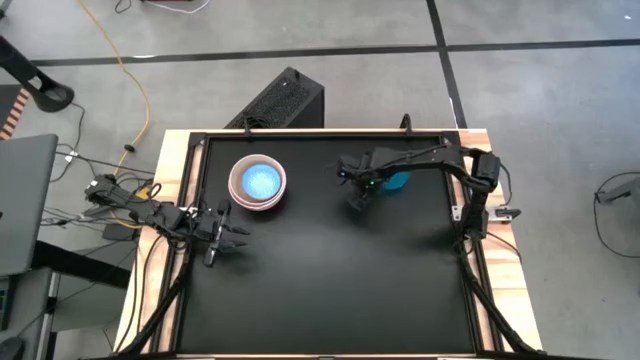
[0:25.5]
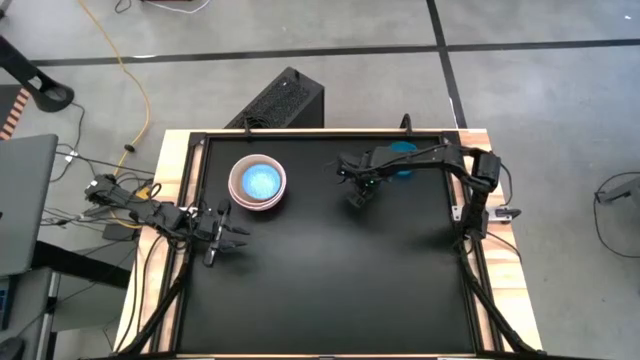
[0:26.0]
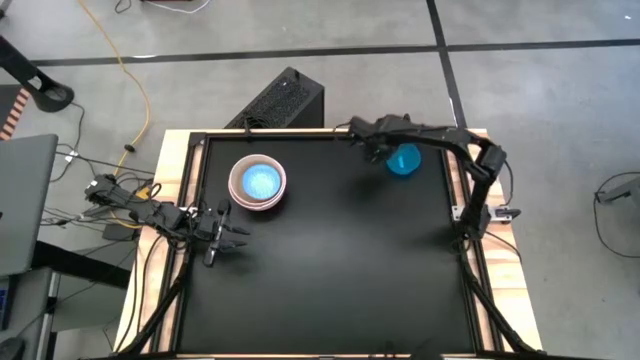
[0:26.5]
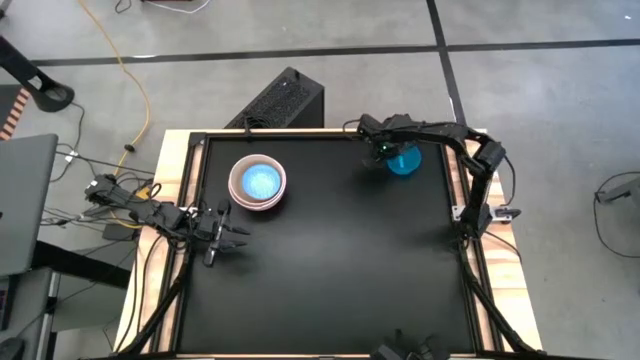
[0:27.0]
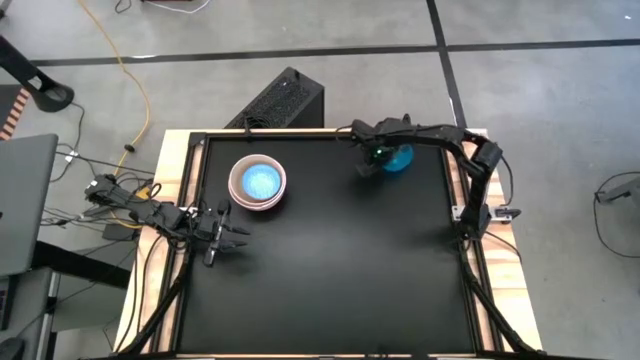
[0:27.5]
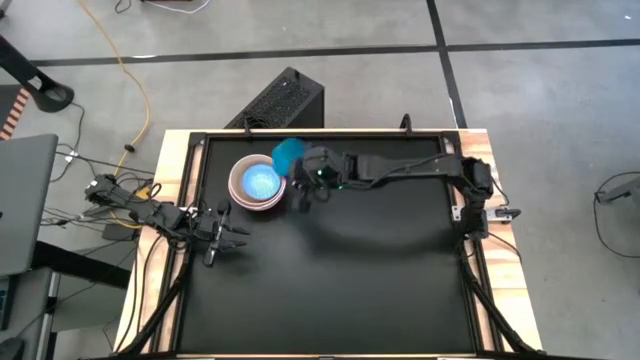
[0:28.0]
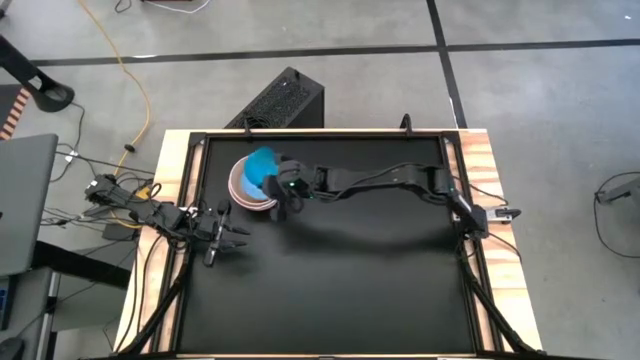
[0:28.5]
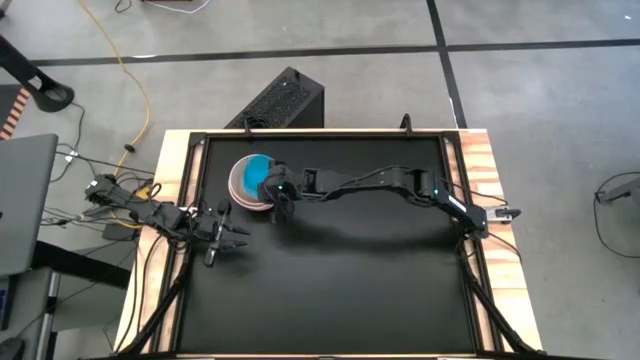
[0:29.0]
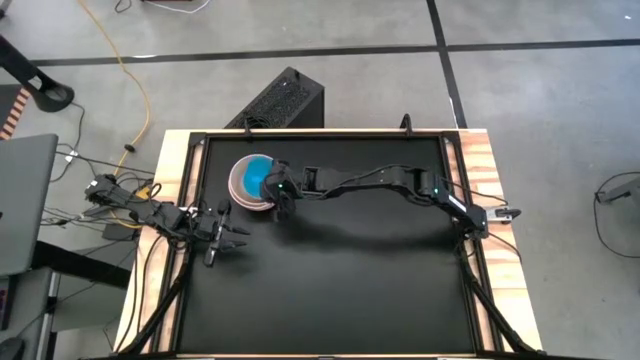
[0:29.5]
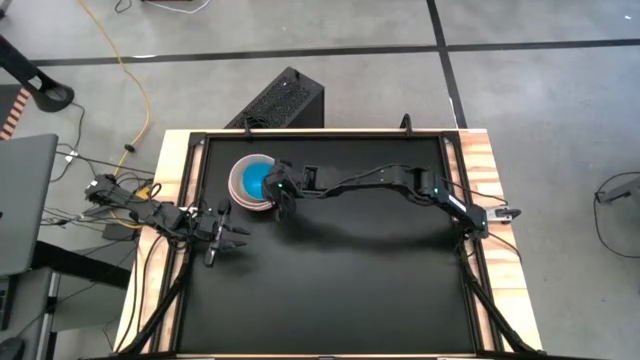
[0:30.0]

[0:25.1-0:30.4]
Stack the blue bowl on top of the blue bowl

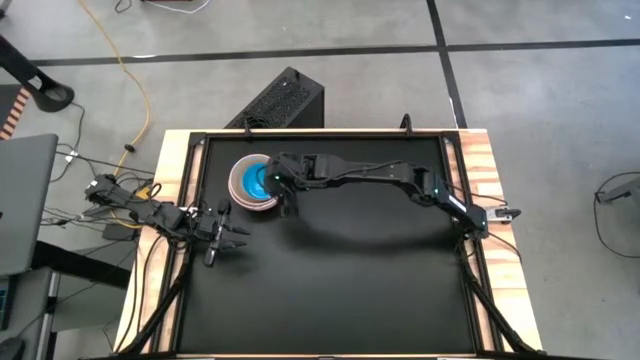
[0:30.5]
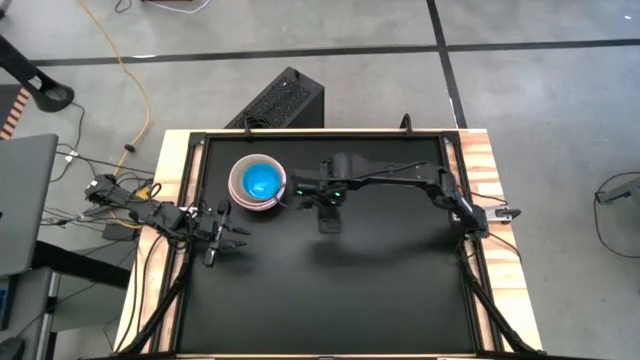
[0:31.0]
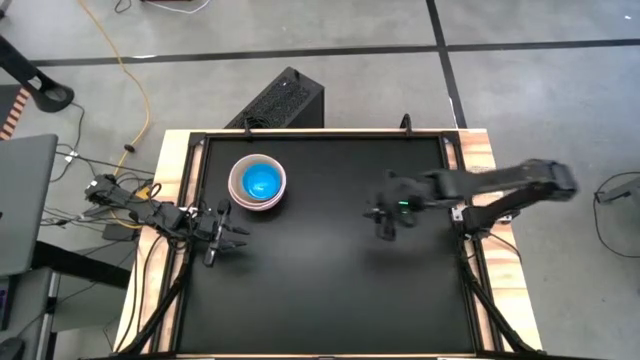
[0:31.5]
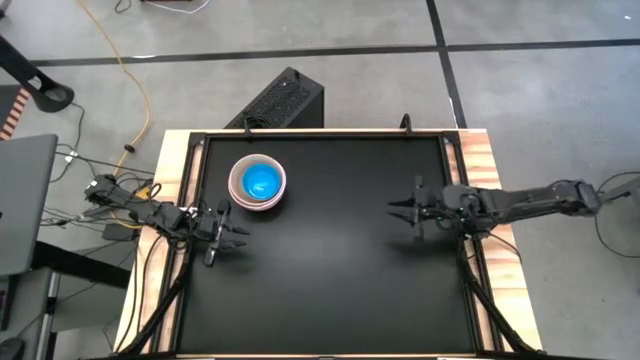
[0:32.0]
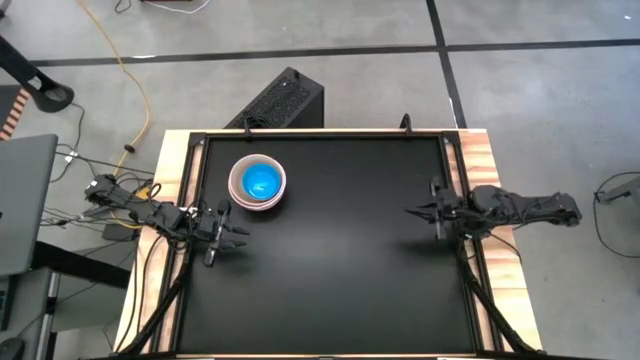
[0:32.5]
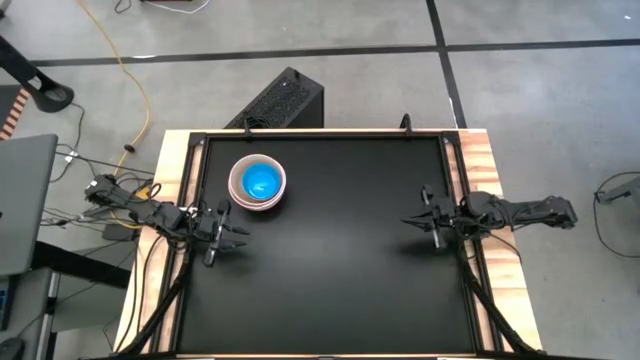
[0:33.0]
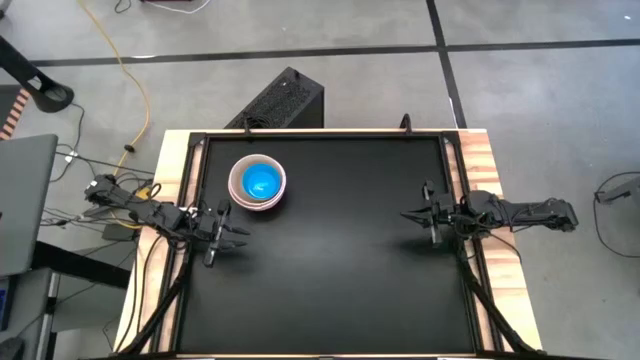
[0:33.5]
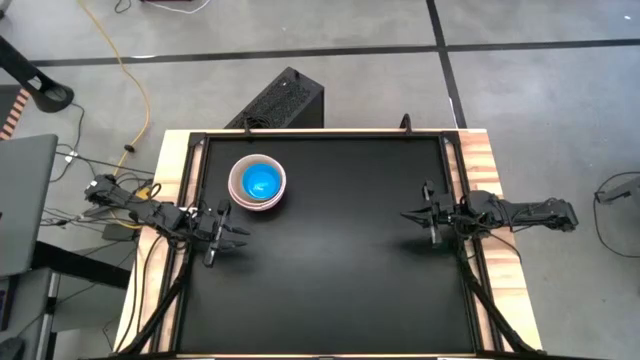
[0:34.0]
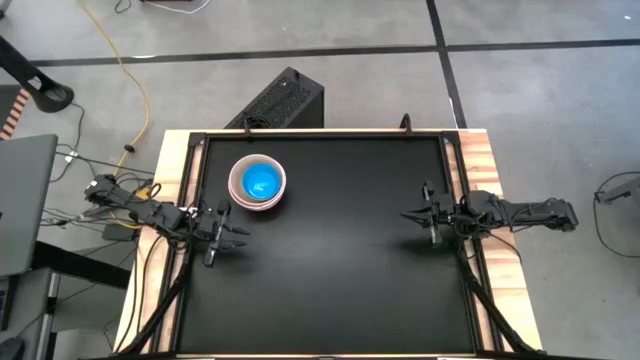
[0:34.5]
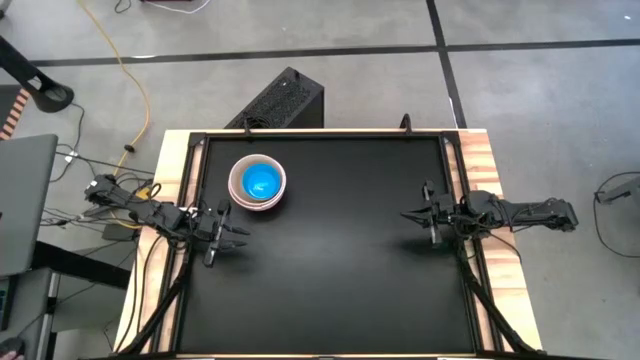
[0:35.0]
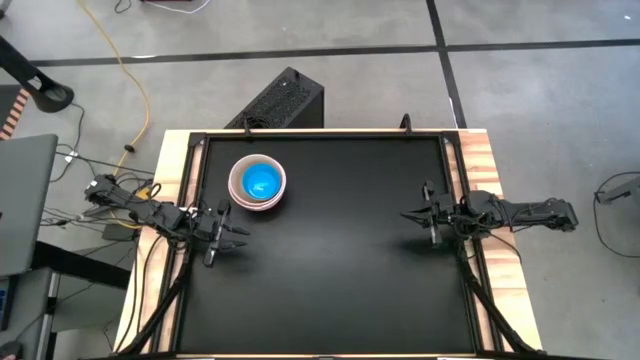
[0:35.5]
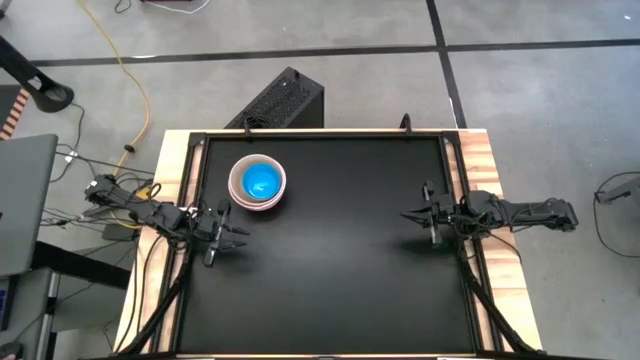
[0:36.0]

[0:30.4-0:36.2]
Return to Home Position
